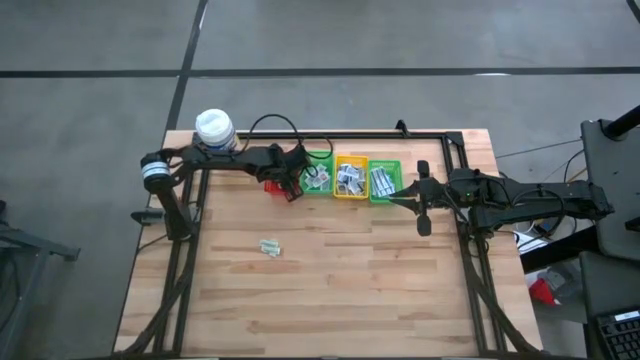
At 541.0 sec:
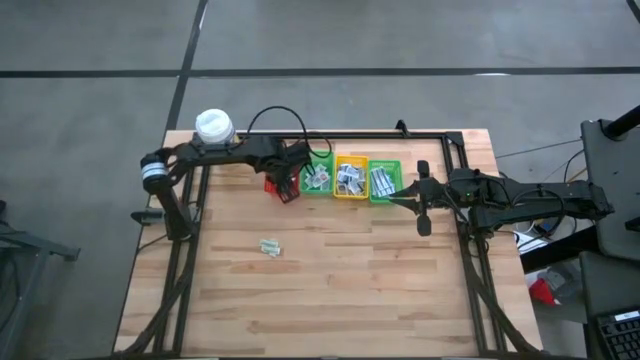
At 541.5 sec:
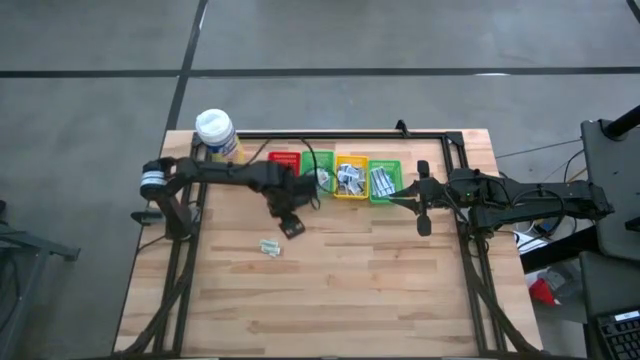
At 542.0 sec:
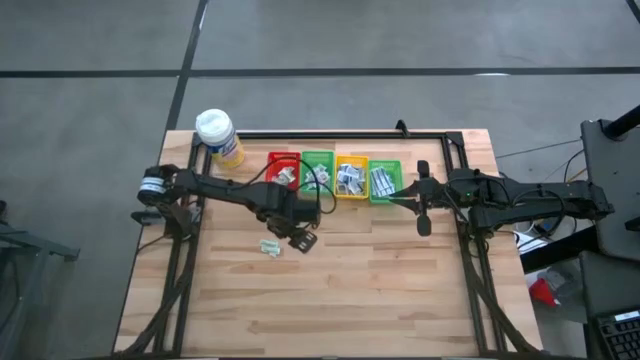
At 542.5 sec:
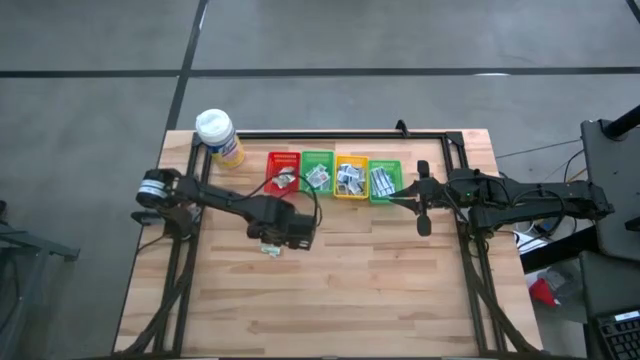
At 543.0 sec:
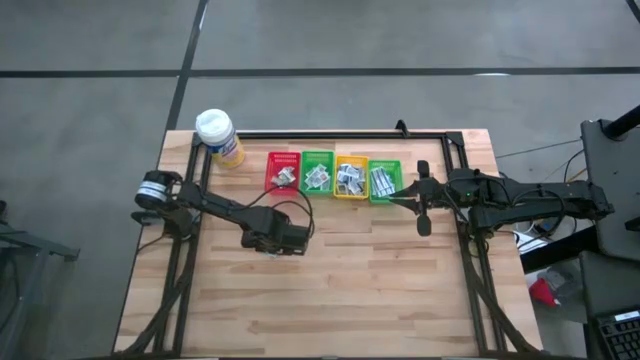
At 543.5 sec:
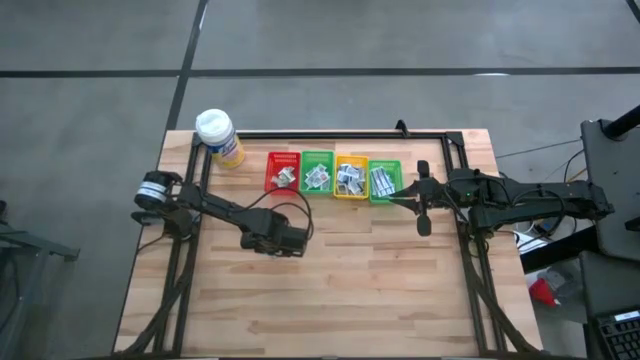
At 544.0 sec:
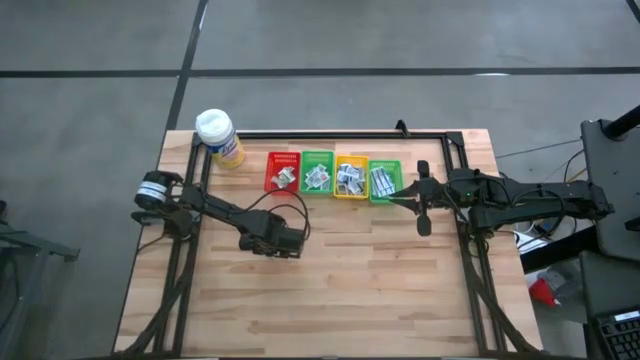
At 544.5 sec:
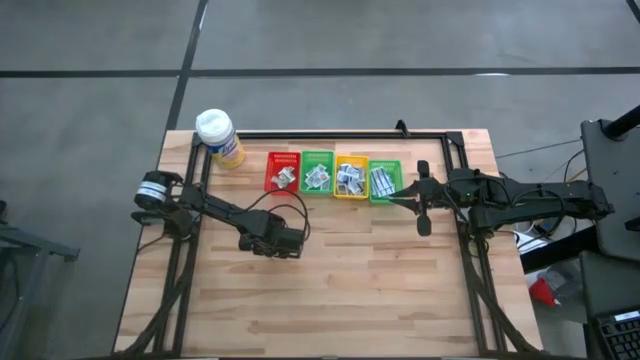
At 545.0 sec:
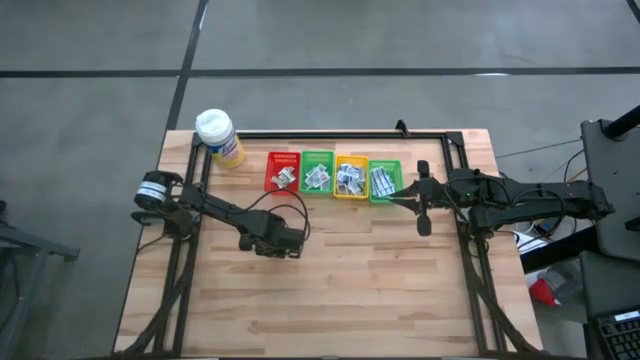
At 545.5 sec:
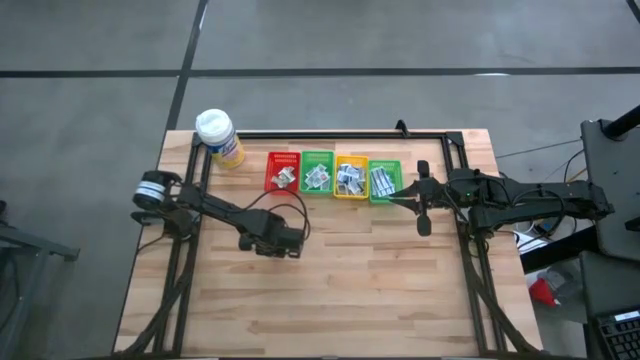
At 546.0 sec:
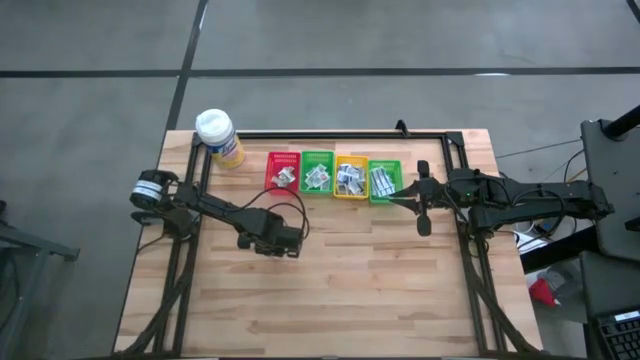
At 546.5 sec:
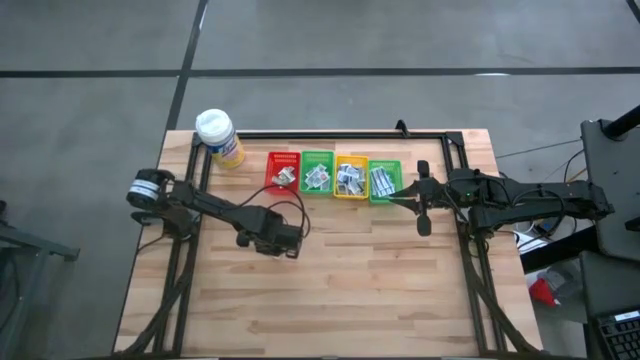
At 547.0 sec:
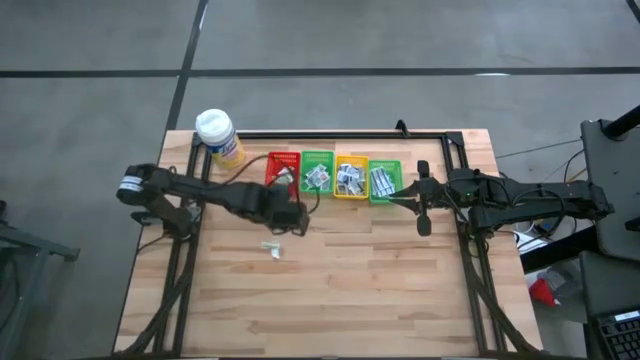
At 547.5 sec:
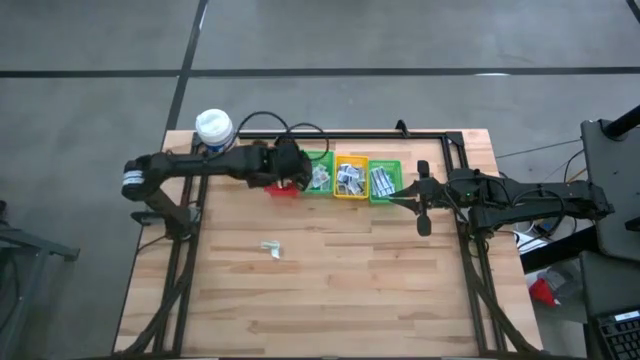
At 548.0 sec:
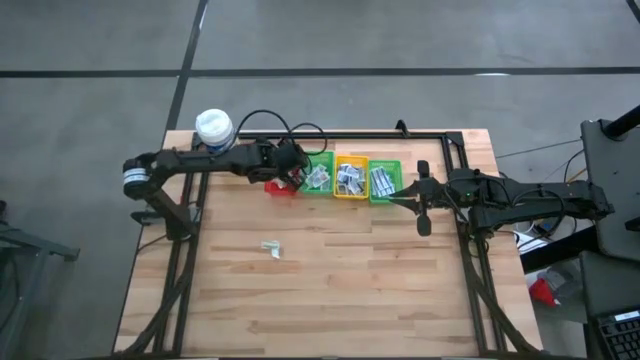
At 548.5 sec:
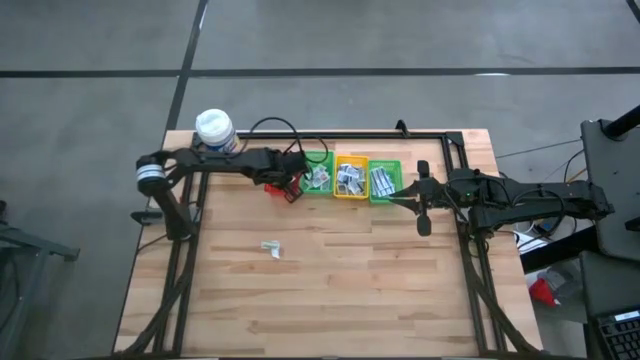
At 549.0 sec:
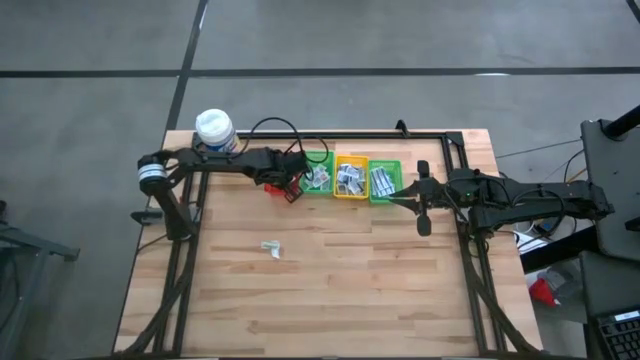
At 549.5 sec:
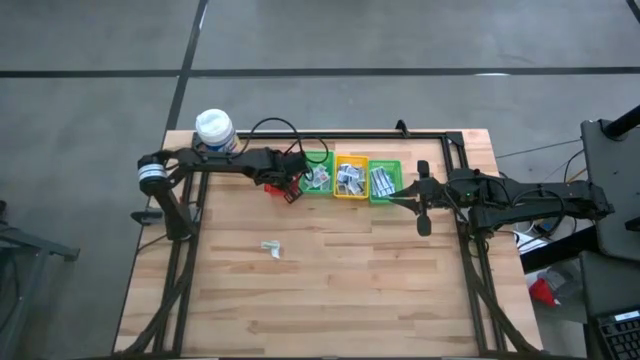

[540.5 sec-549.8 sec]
Task: Pick & Place First Aid Supplies
Put the green bandage into the red bin

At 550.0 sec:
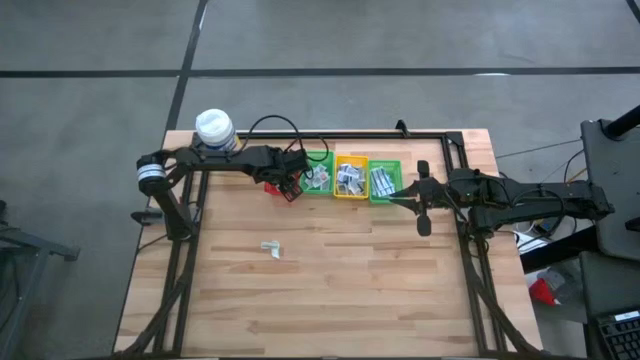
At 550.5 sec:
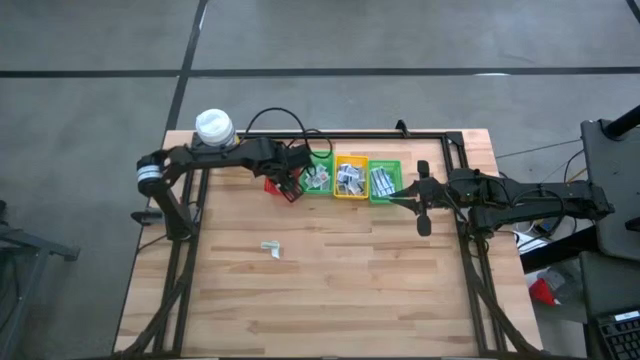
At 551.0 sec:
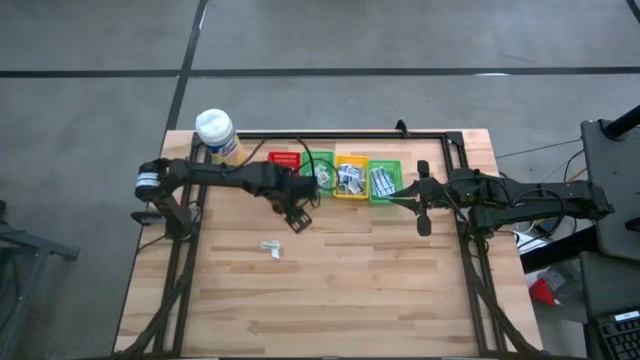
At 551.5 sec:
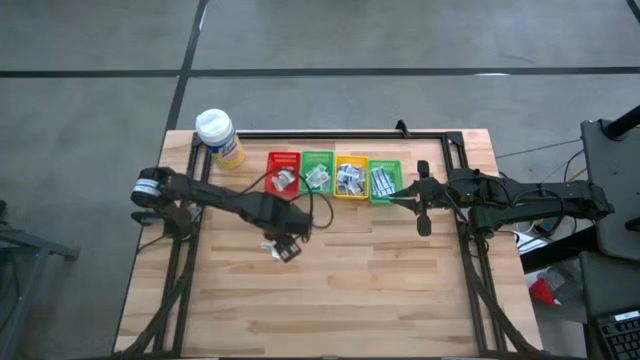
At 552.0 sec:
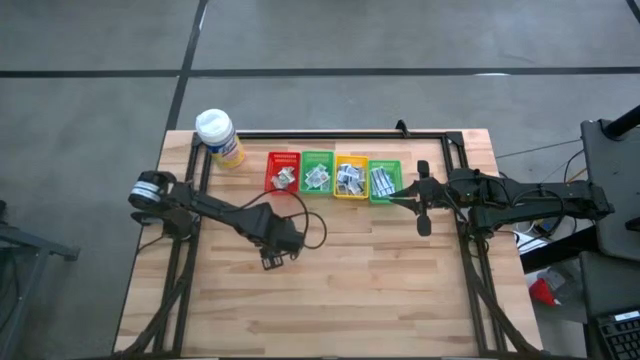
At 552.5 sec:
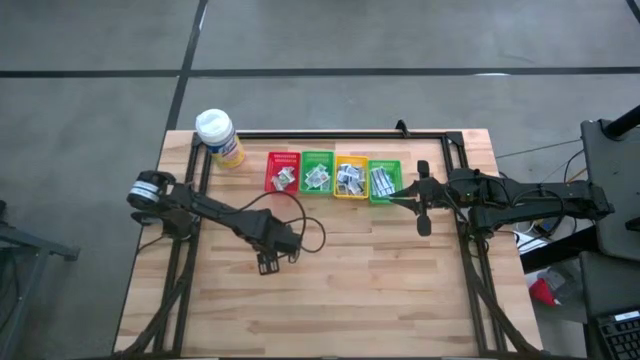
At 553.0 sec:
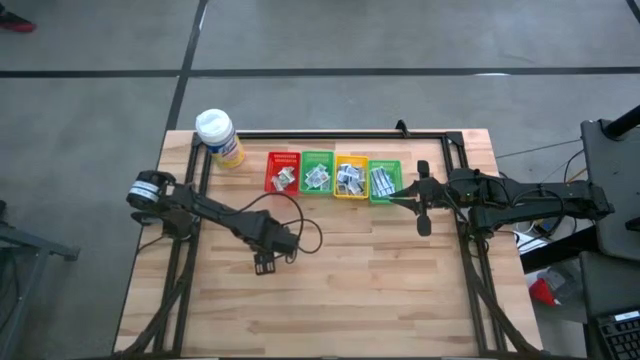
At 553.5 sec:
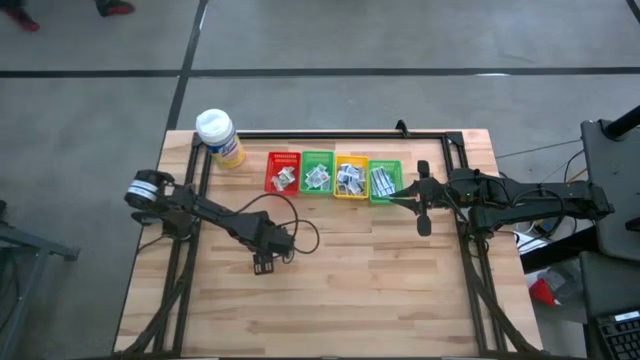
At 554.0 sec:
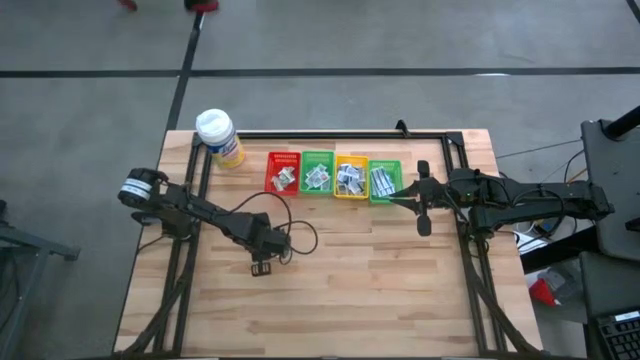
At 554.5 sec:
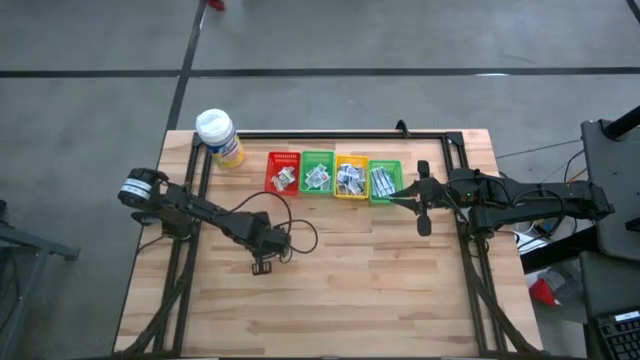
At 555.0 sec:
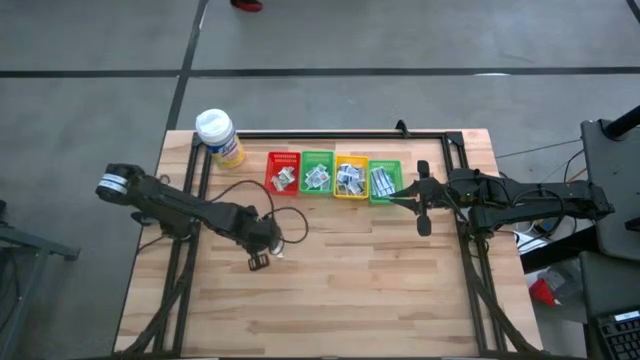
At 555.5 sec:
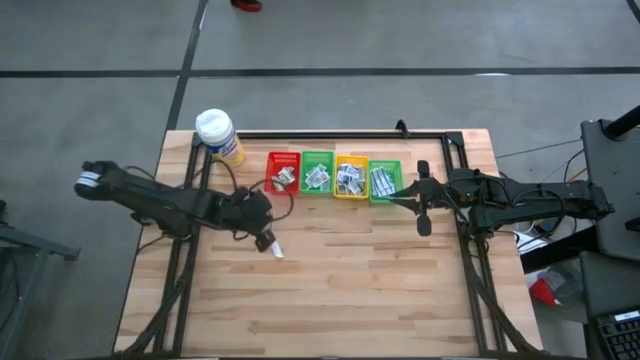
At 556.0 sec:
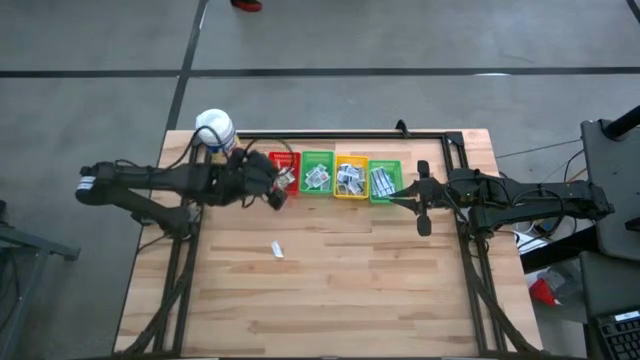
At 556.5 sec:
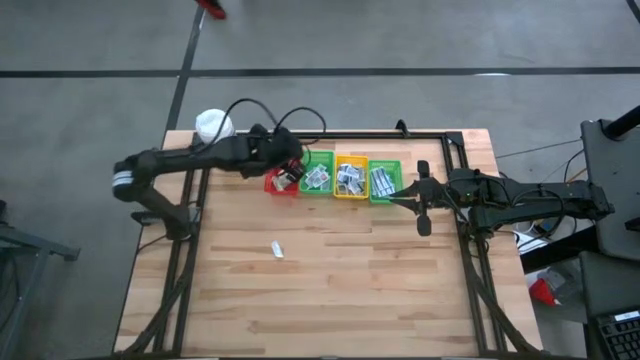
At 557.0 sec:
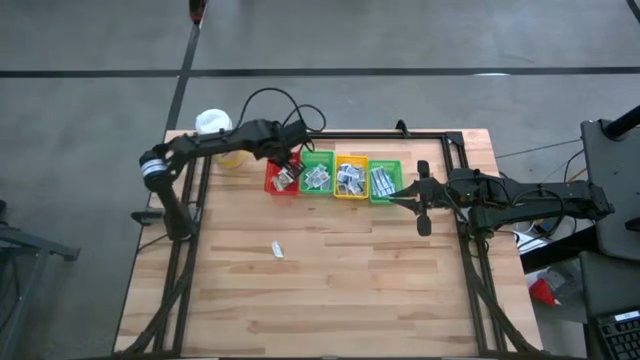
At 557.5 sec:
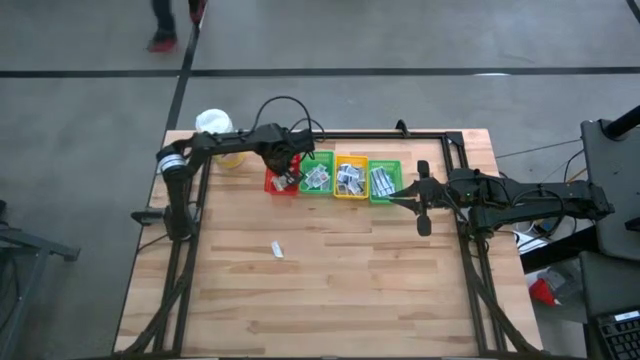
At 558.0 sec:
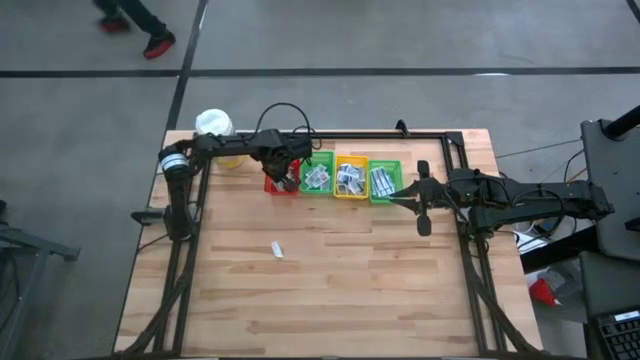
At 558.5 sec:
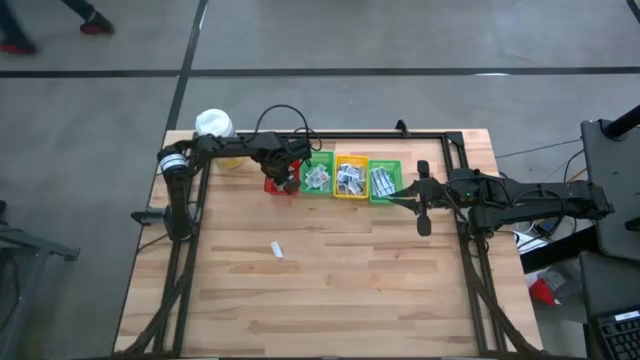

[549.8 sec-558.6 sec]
Put the green bandage into the red bin
